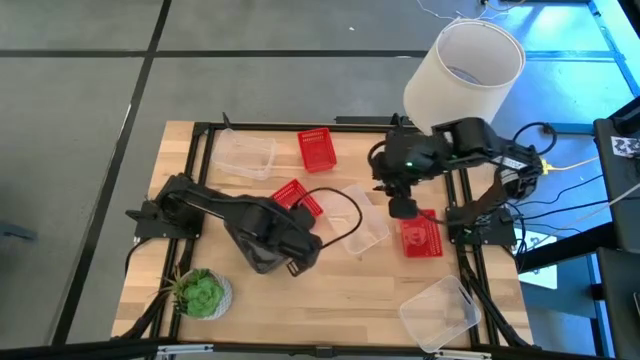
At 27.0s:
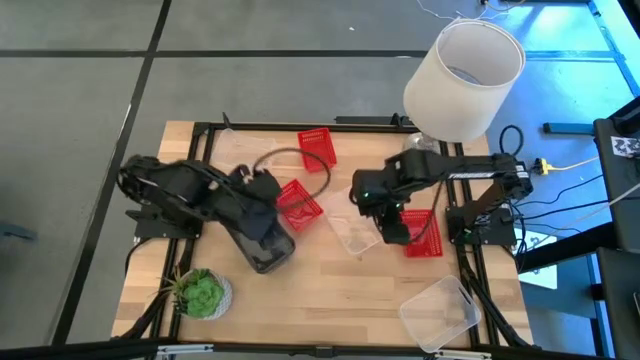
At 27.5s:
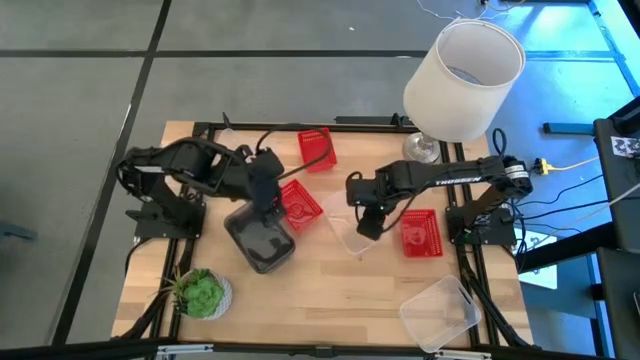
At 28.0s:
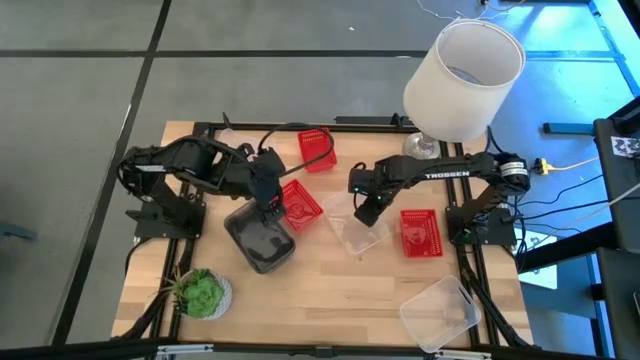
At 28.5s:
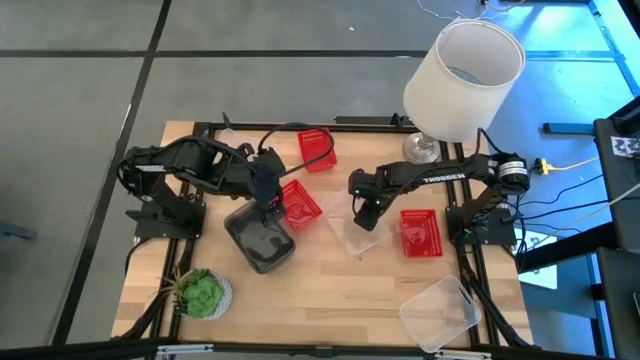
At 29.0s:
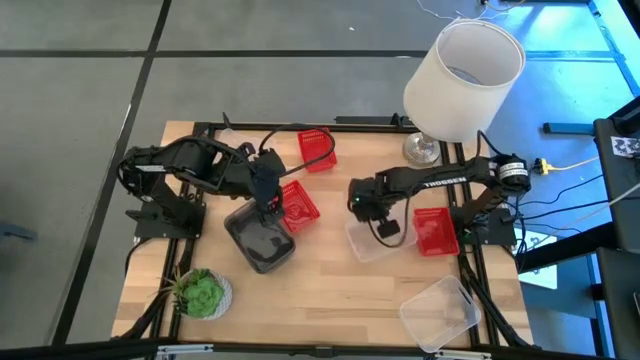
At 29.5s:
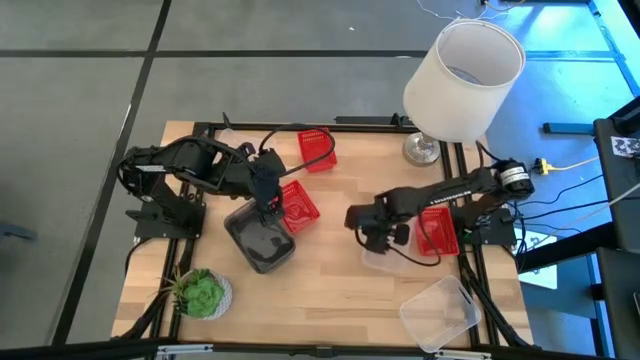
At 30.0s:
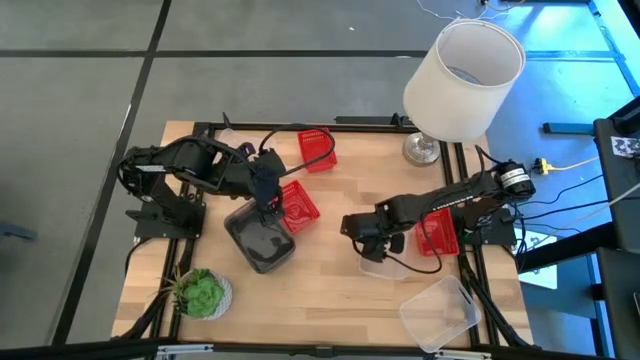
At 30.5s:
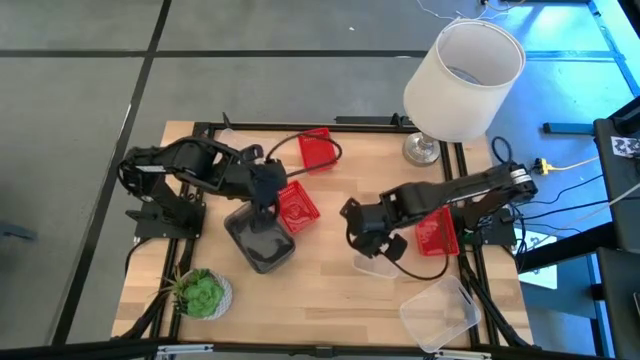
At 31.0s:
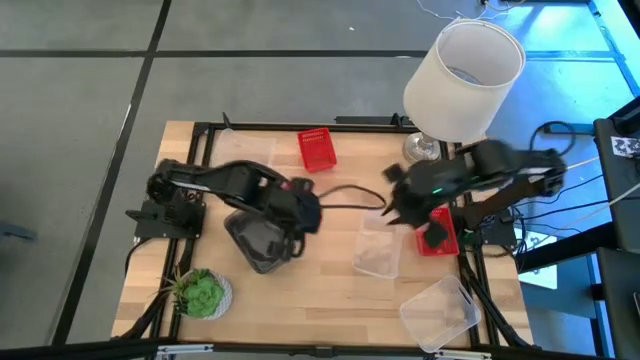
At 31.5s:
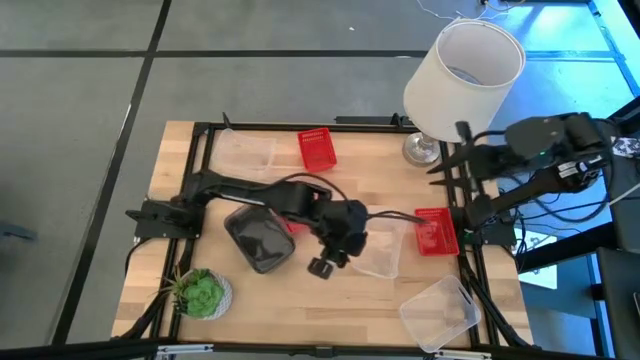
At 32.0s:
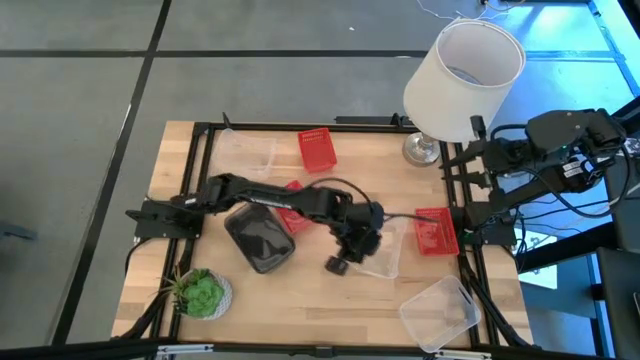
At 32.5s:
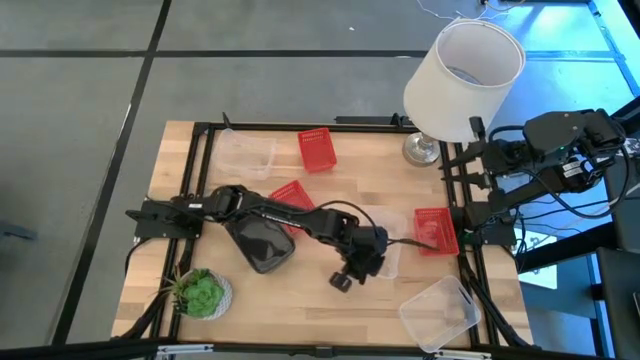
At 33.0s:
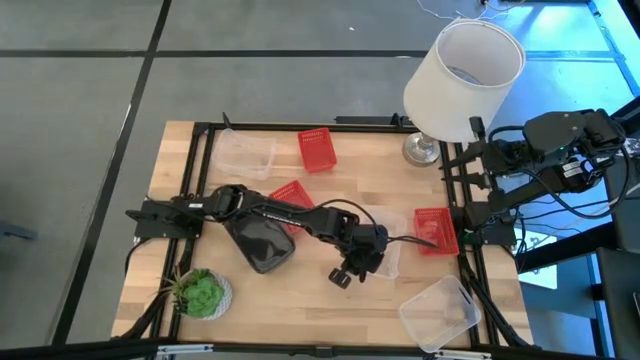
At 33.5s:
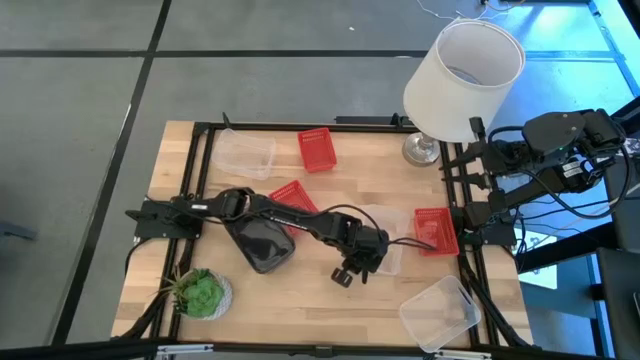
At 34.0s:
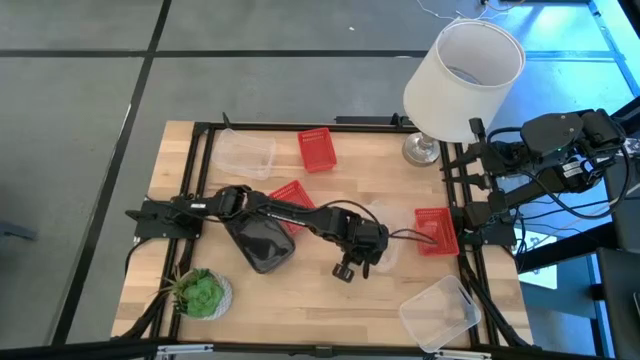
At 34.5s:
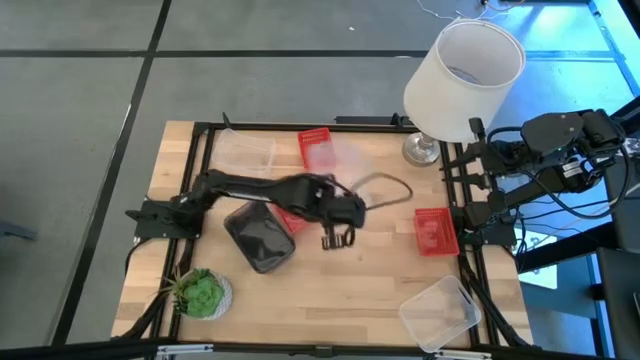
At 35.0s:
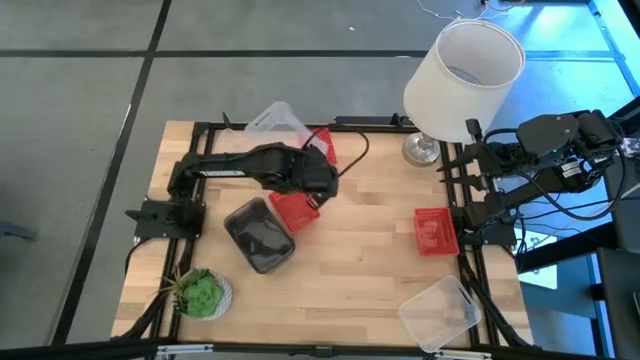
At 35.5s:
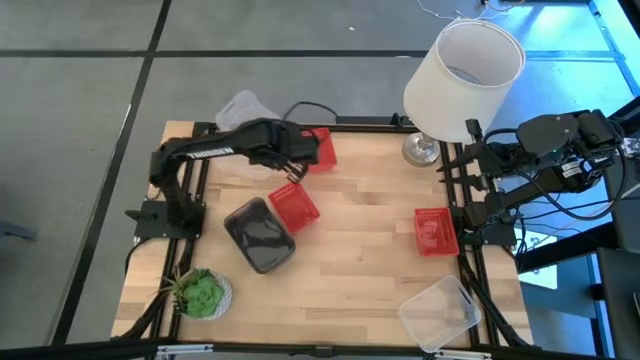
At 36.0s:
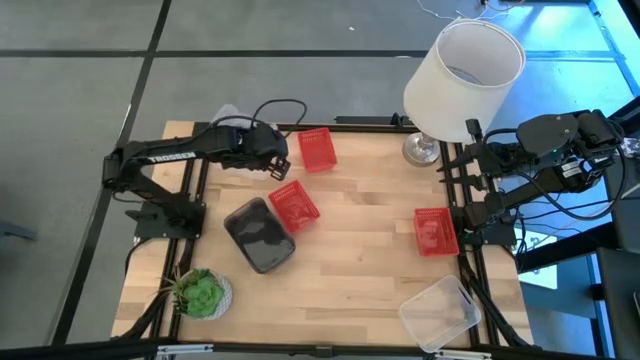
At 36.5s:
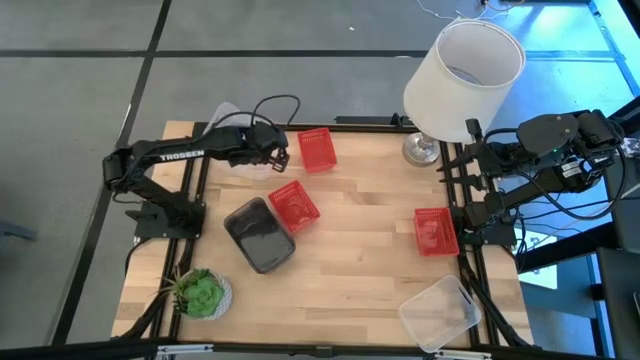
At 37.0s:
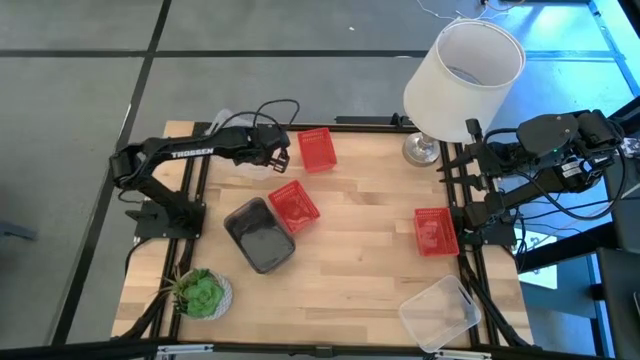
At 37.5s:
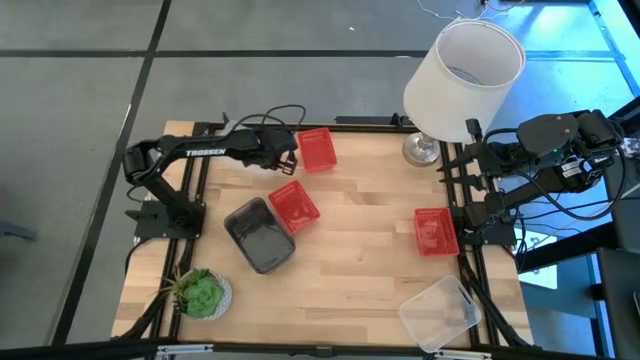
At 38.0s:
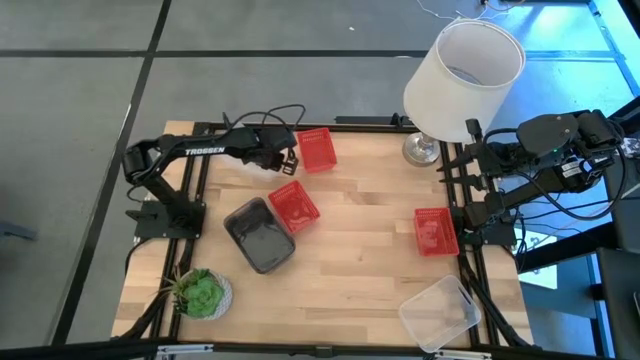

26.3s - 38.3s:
Stack the middle transparent bin on the top transparent bin

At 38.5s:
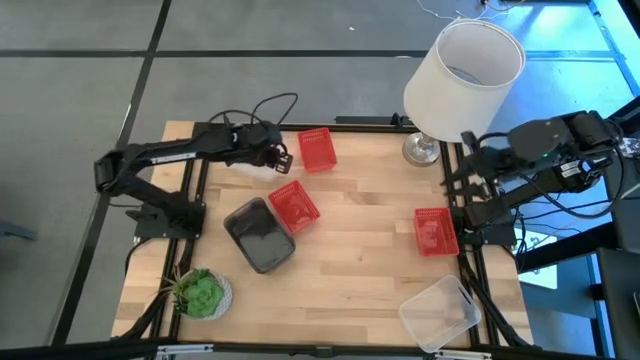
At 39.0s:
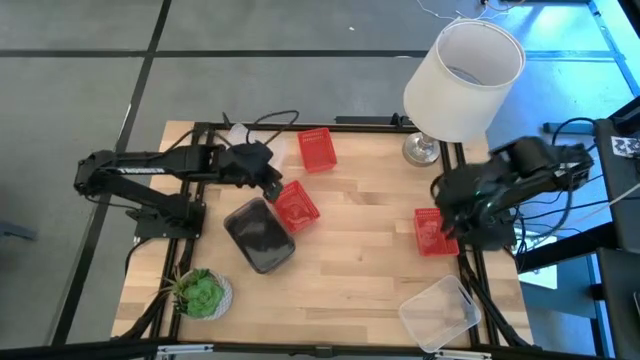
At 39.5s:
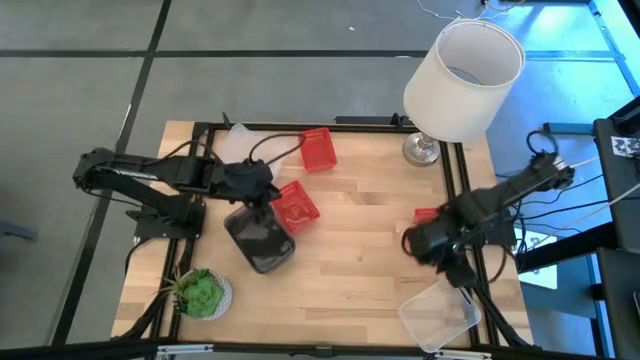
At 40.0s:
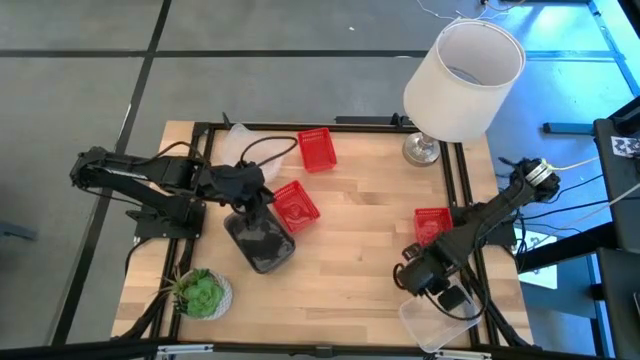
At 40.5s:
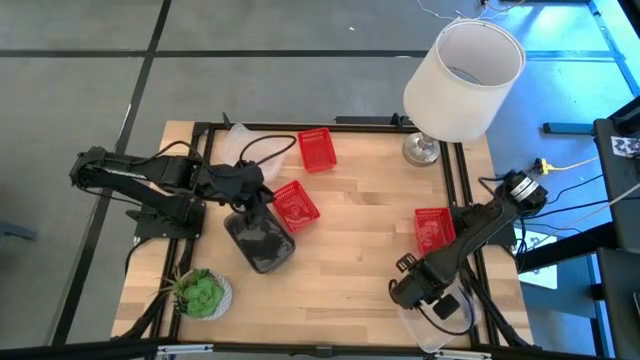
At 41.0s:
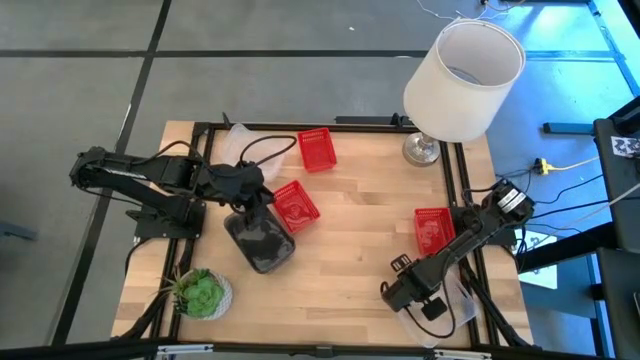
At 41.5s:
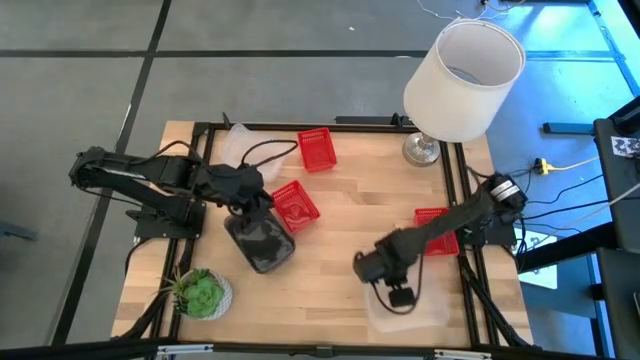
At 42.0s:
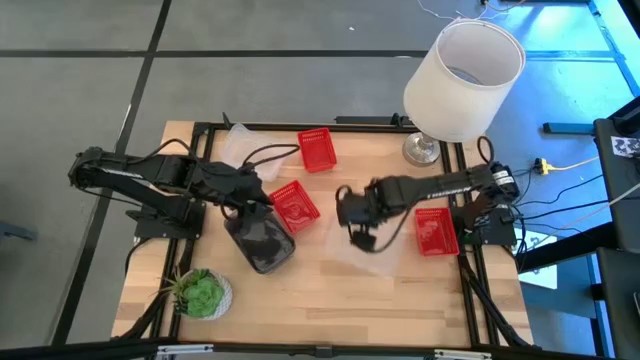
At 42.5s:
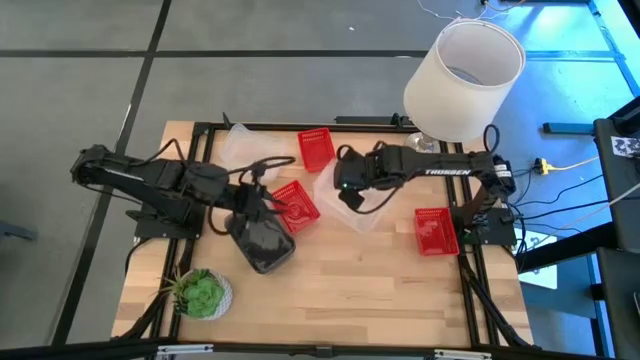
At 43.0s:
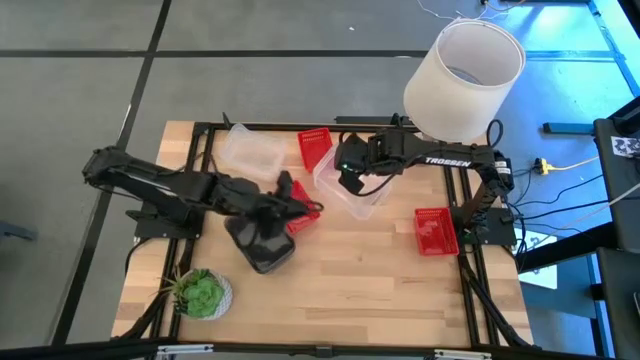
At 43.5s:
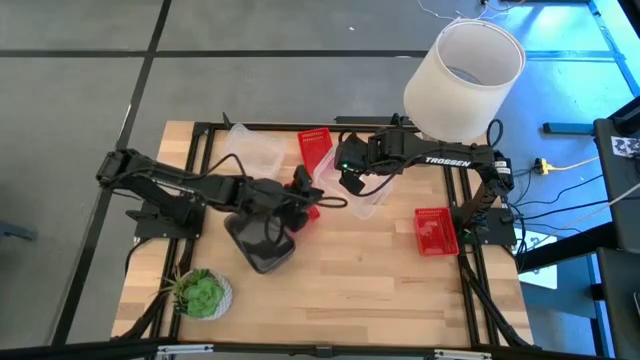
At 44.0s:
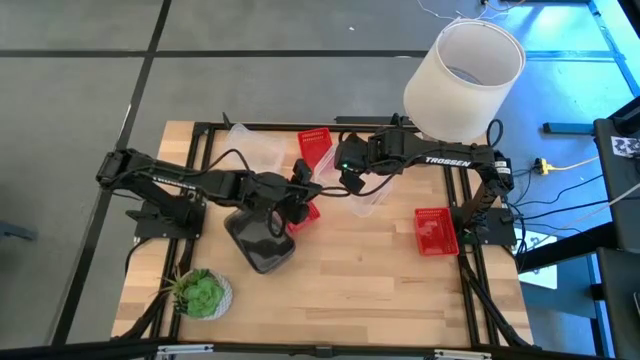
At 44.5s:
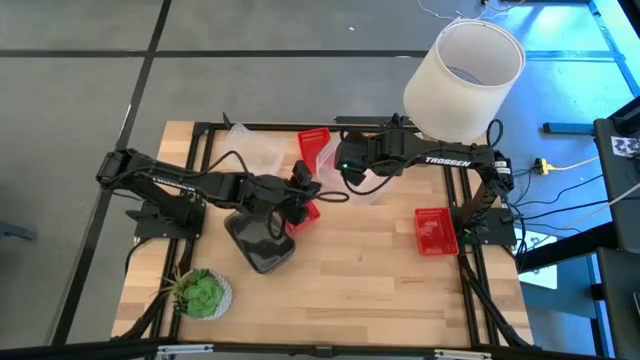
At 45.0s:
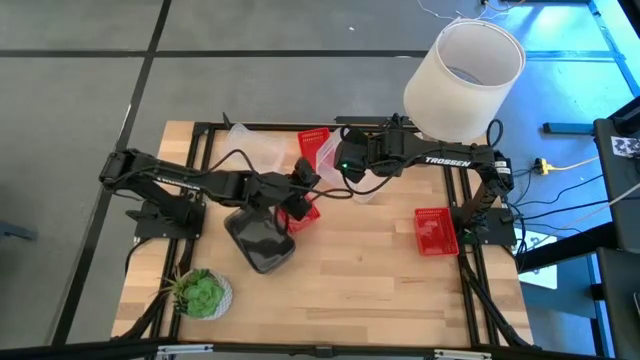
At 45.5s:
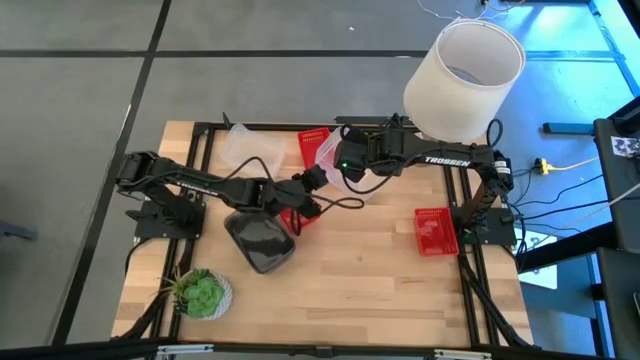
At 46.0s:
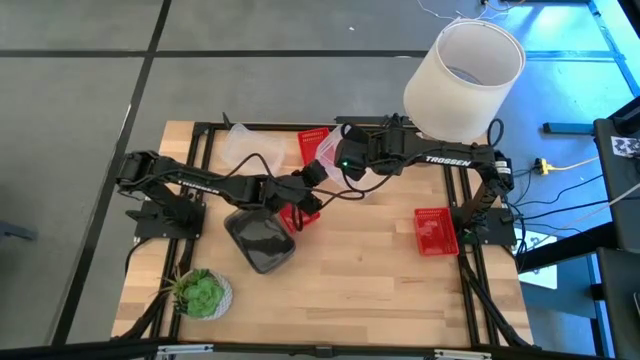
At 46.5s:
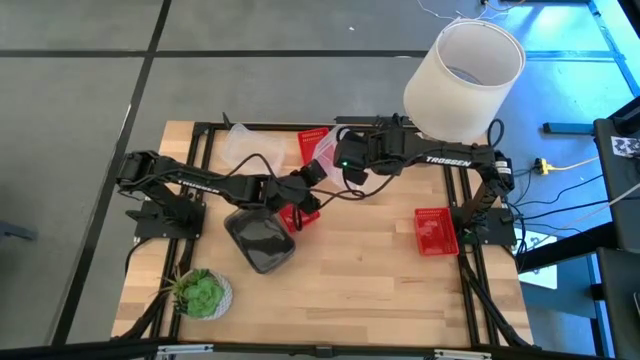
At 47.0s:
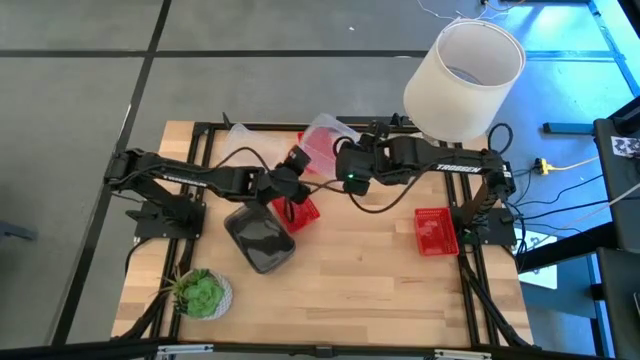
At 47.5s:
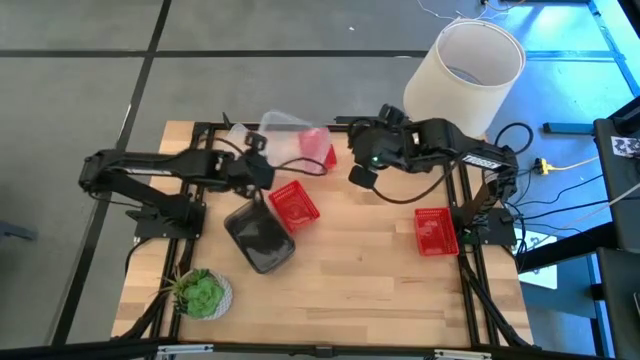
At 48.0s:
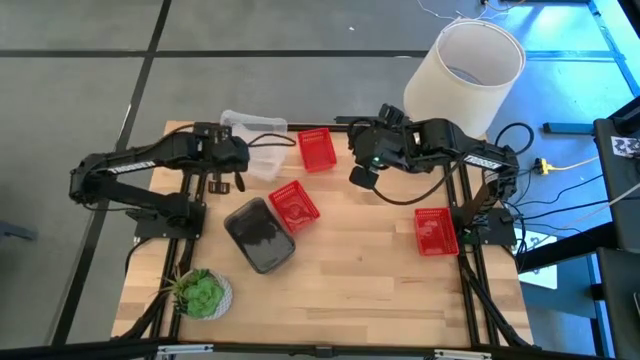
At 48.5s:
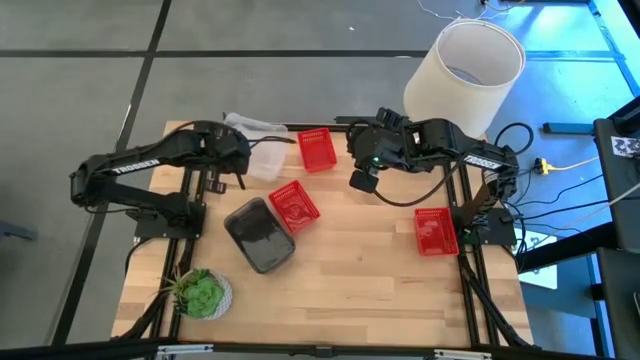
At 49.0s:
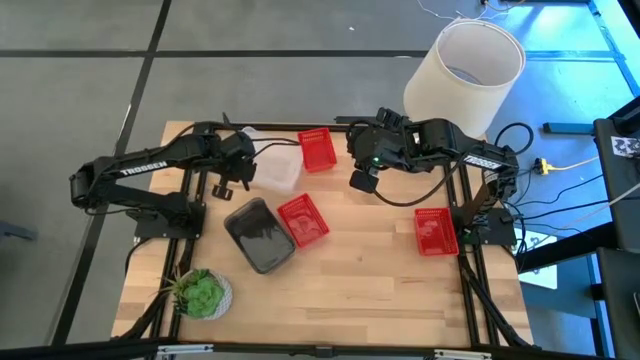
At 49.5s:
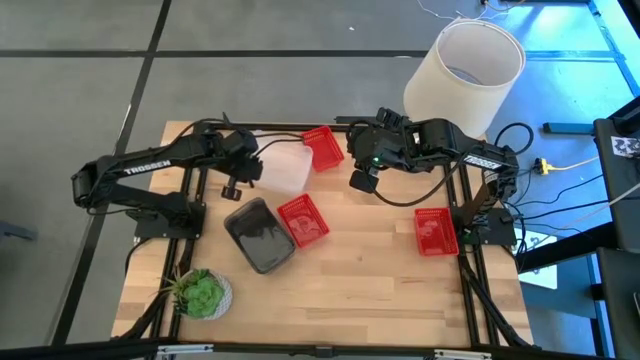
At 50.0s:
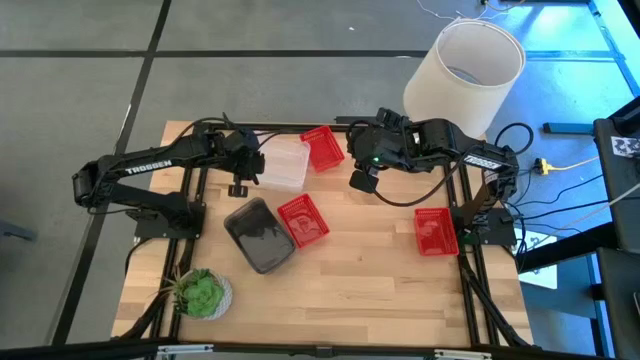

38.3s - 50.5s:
Stack the bottom transparent bin on the stacked transparent bins
